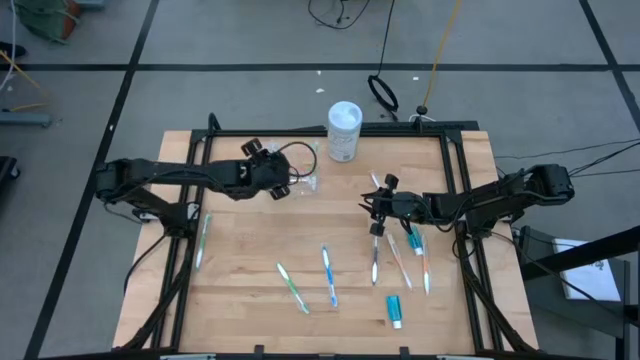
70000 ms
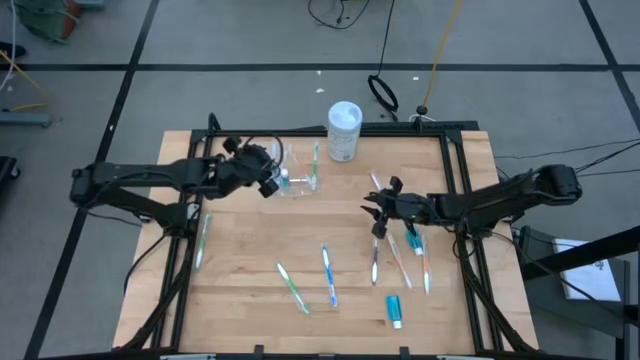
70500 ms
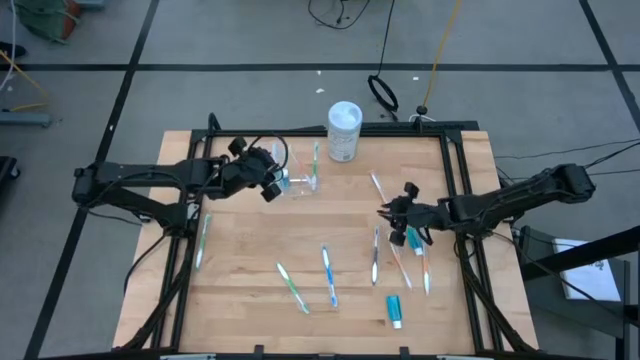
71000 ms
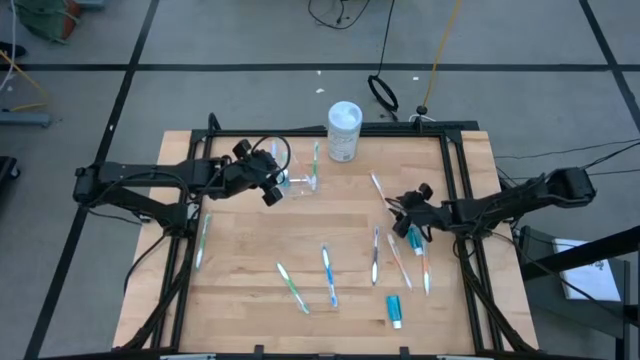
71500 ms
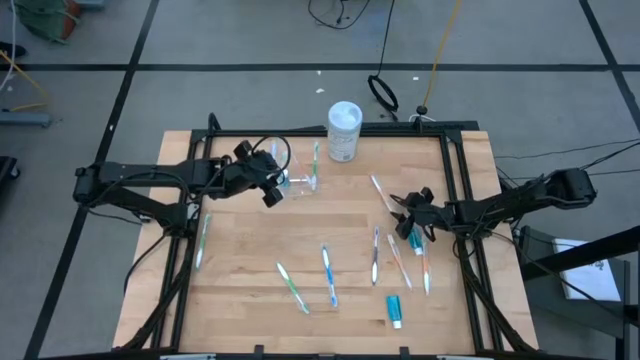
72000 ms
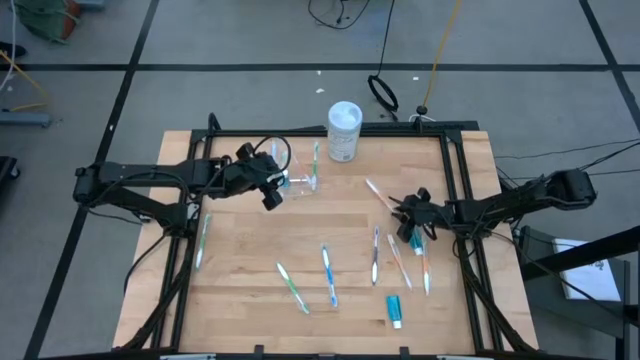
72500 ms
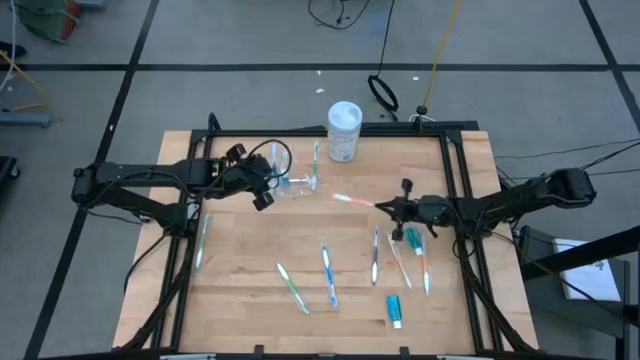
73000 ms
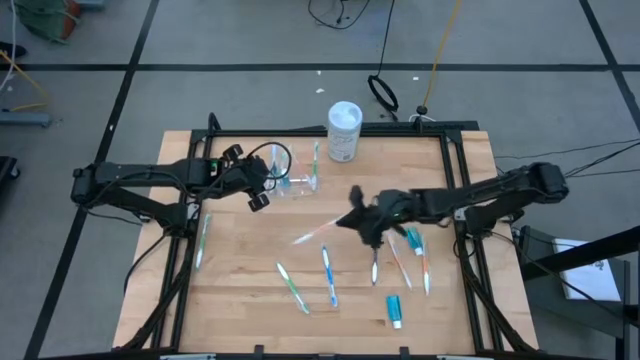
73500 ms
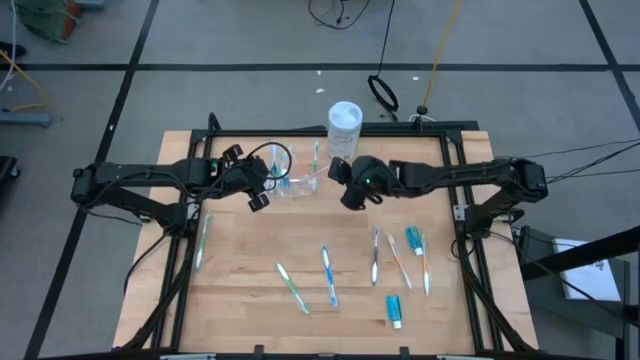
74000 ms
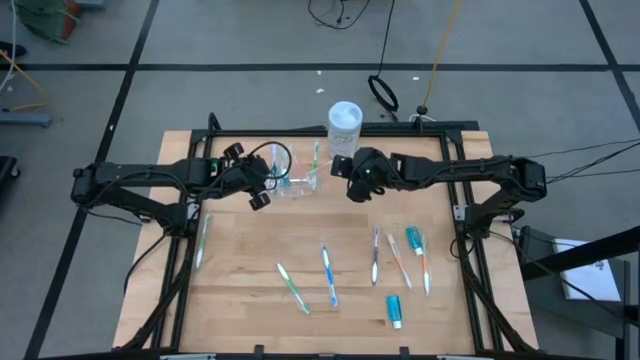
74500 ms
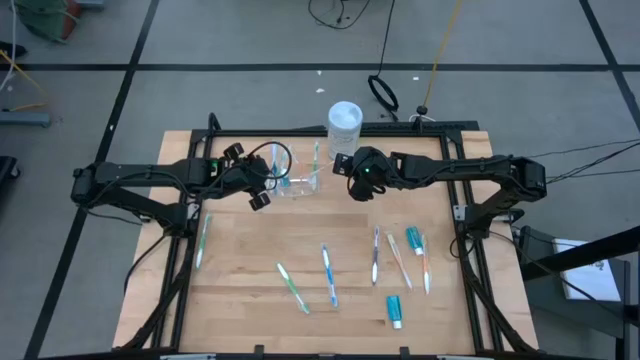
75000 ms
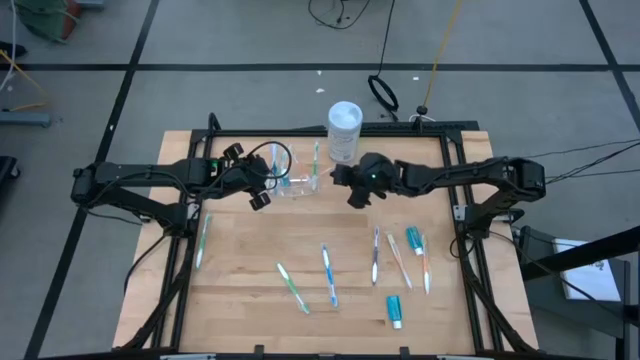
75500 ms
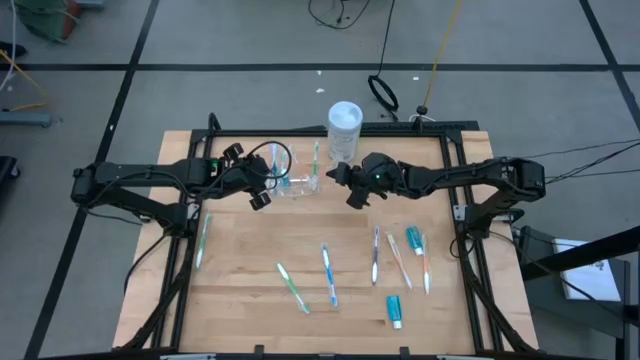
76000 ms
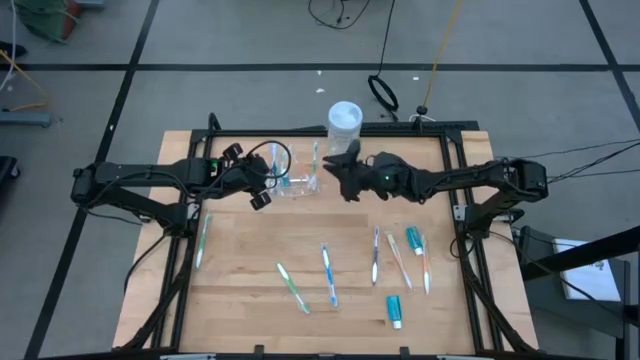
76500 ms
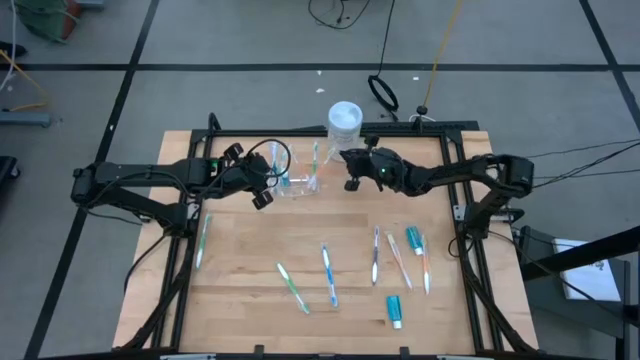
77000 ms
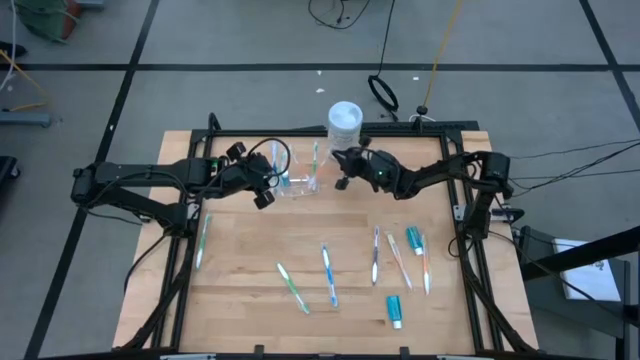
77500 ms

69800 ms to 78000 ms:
Task: Pick & Place toothbrushing station
Put the orange toothbrush into the transparent organizer

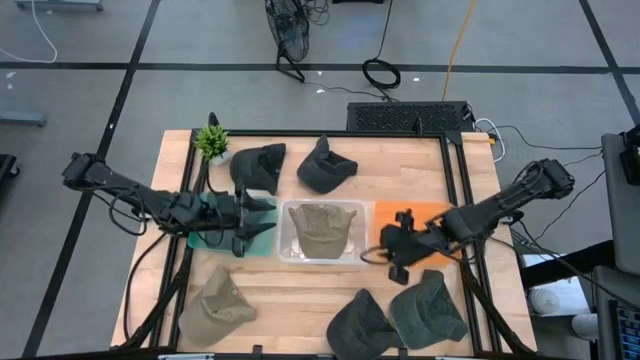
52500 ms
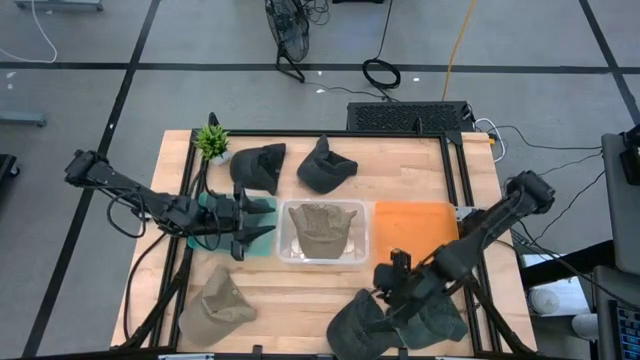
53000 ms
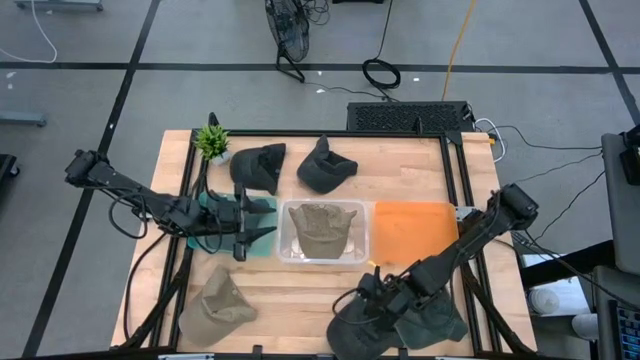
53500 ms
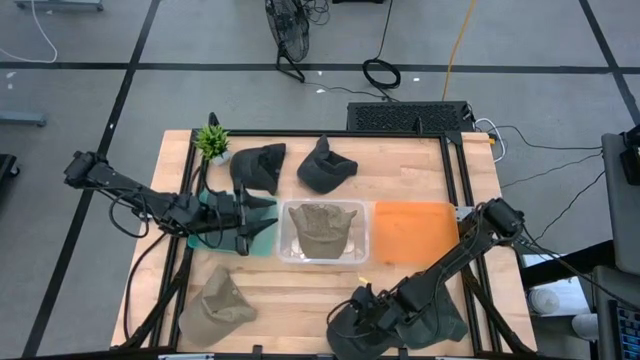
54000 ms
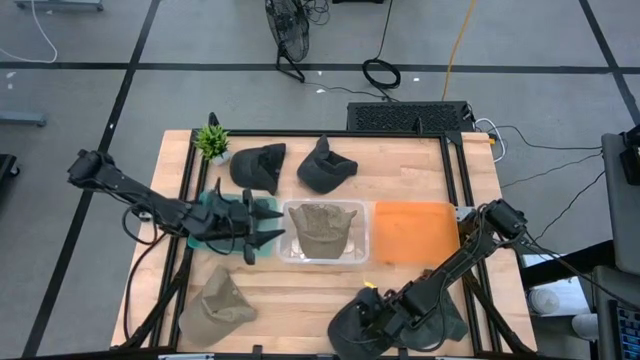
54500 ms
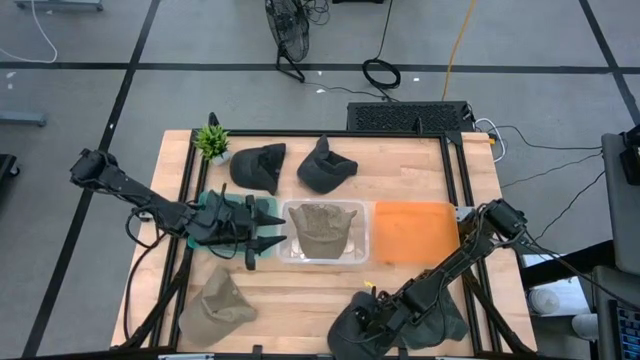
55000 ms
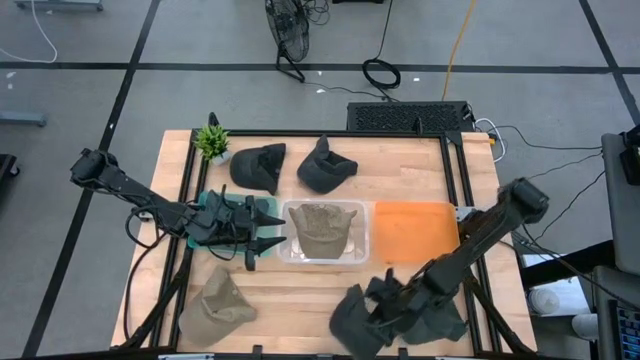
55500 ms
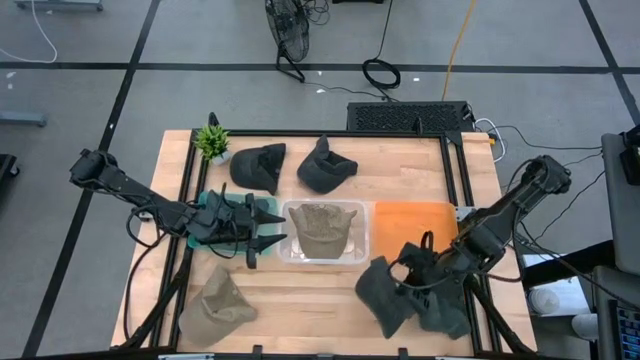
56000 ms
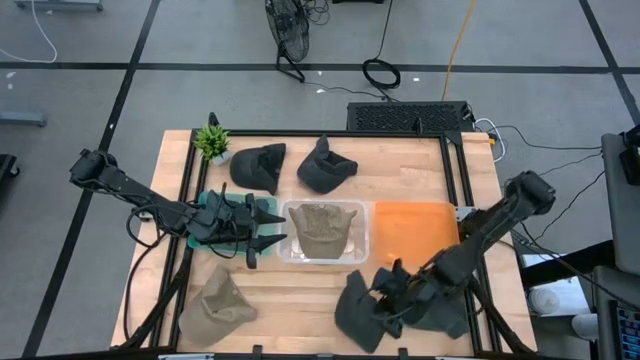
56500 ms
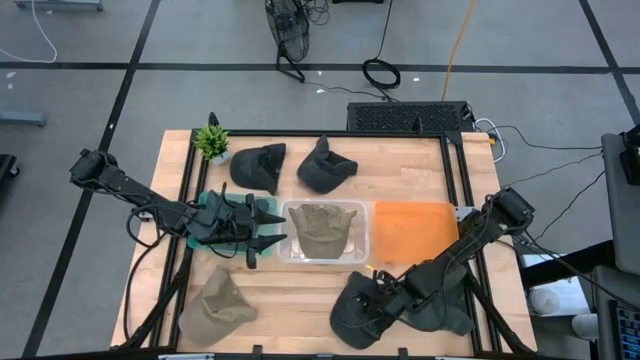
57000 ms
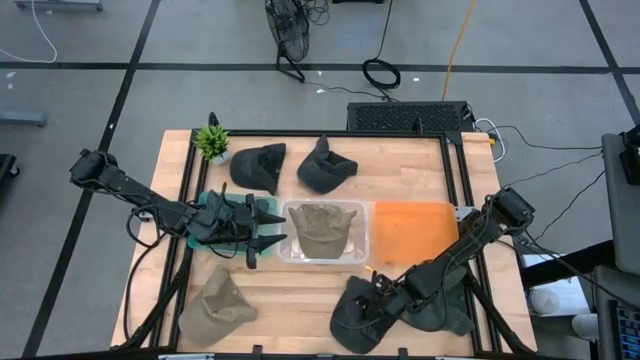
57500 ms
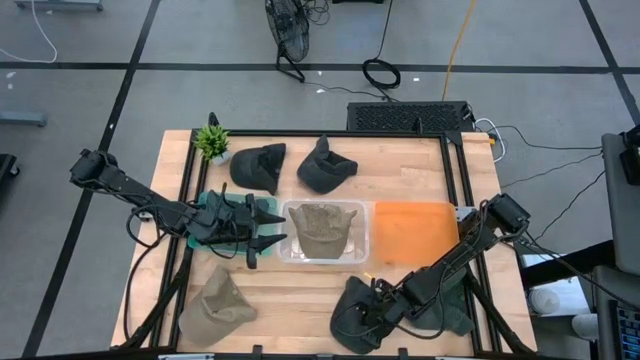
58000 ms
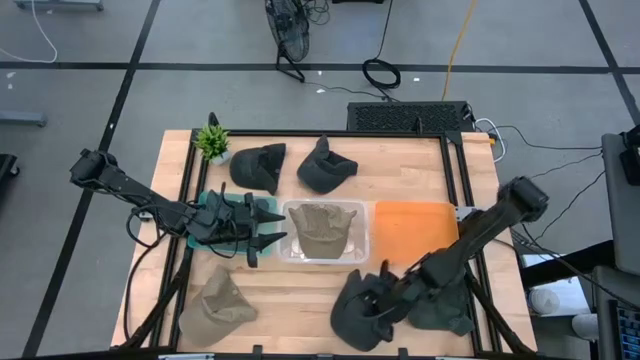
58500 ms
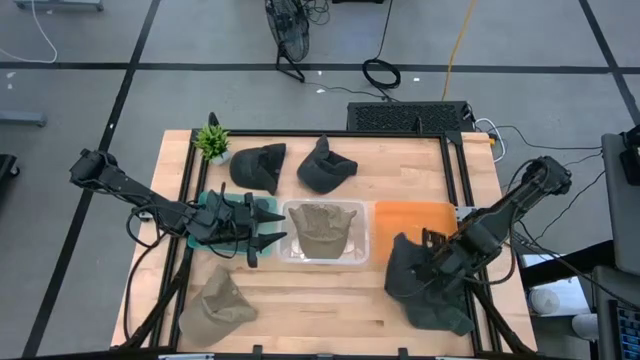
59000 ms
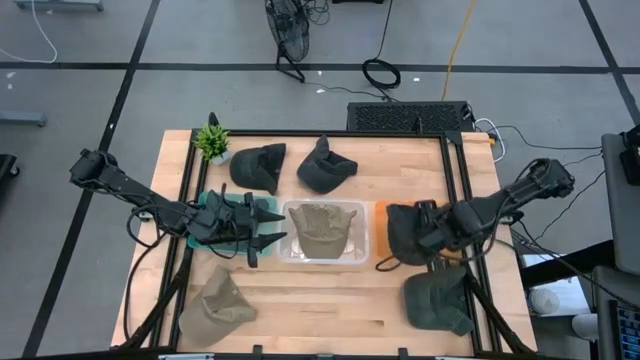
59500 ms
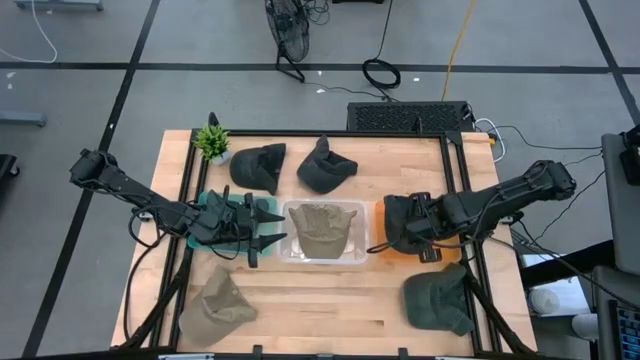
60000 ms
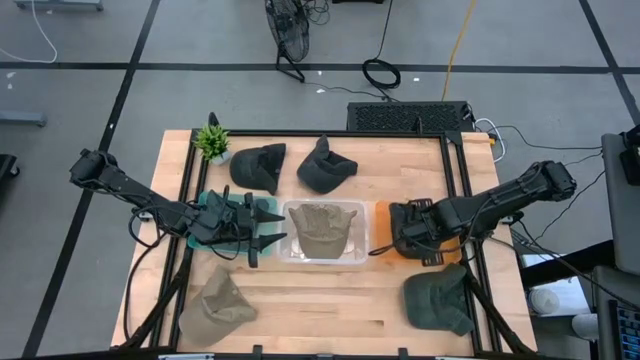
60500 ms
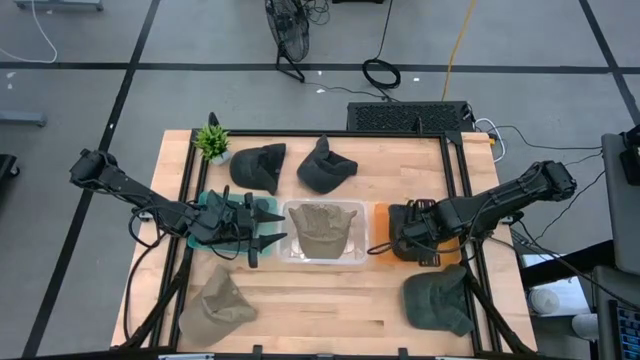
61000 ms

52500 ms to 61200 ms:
Task: Pick & Place hat
Put the bottom black cap into the orange bin
